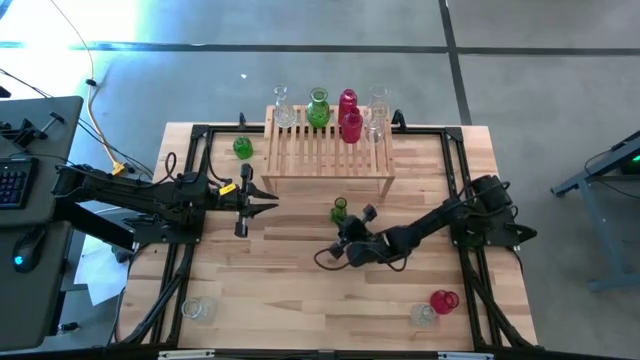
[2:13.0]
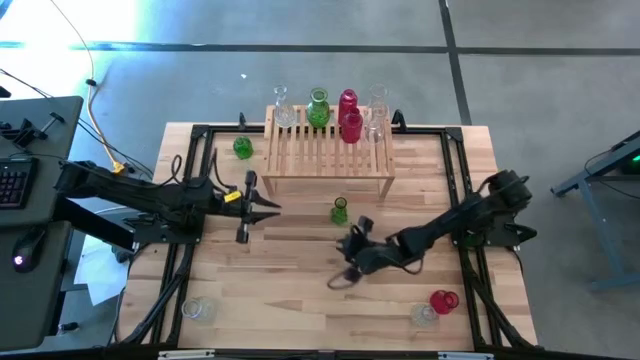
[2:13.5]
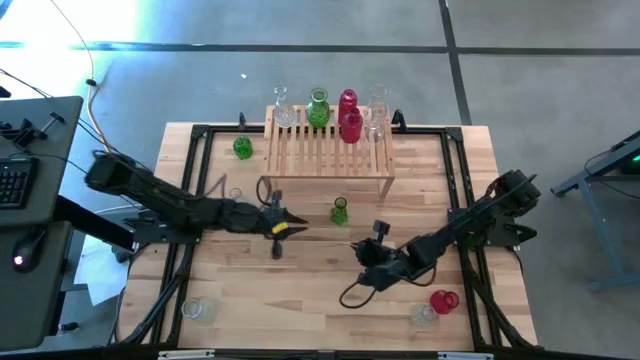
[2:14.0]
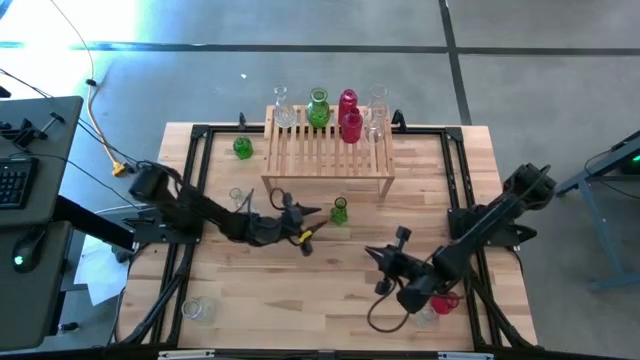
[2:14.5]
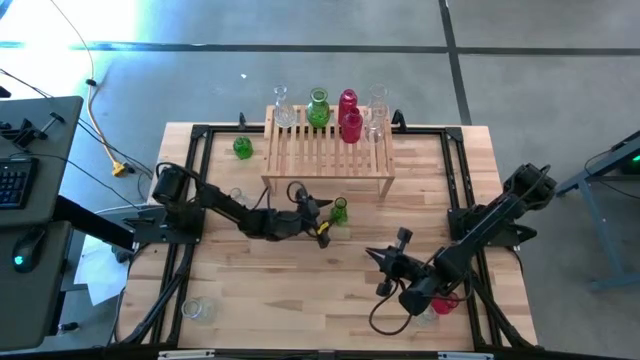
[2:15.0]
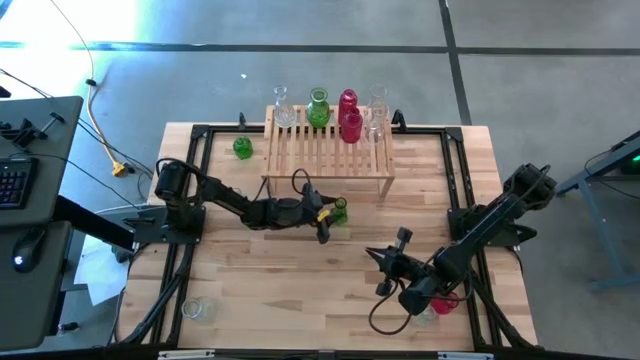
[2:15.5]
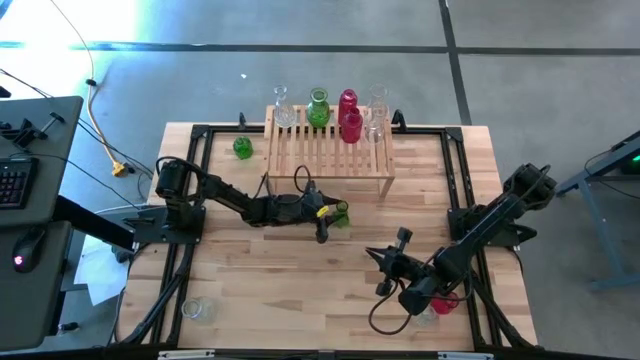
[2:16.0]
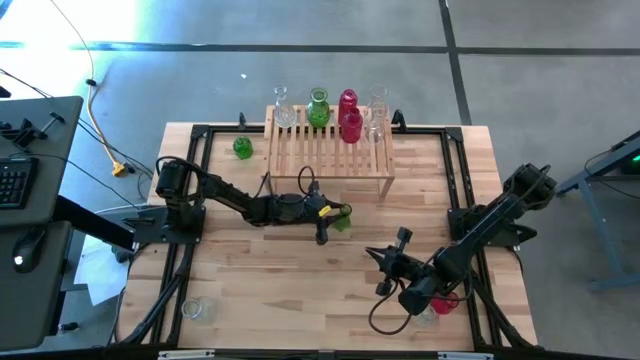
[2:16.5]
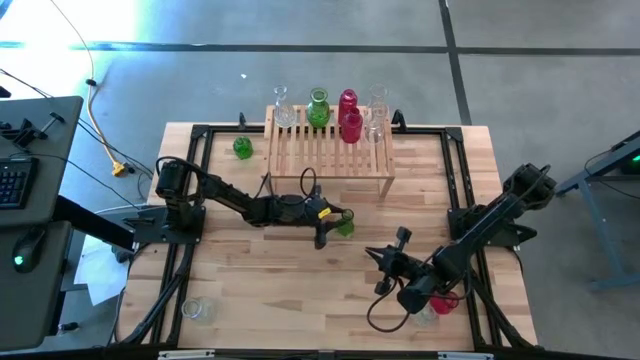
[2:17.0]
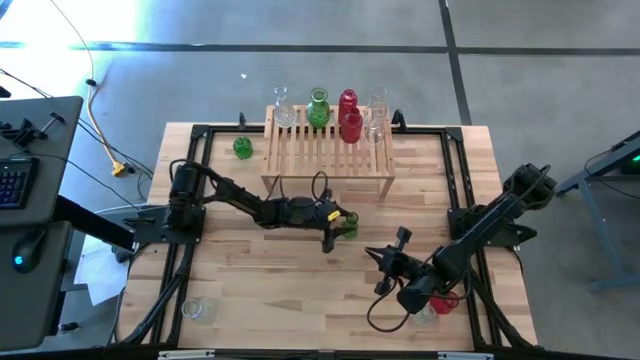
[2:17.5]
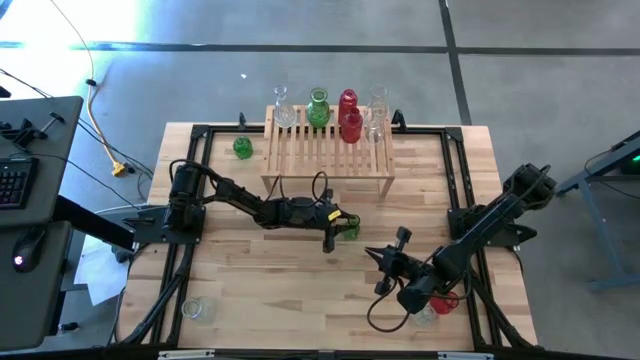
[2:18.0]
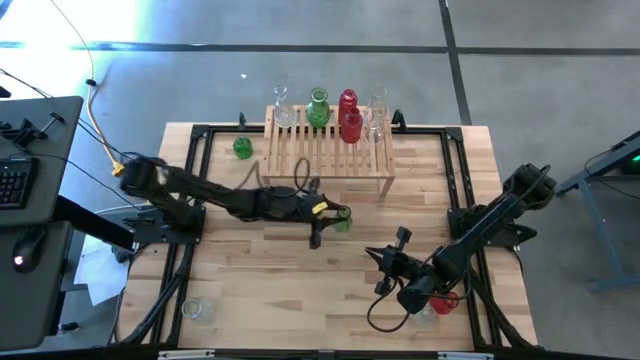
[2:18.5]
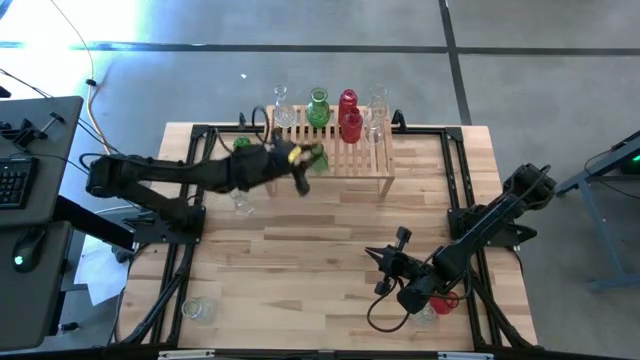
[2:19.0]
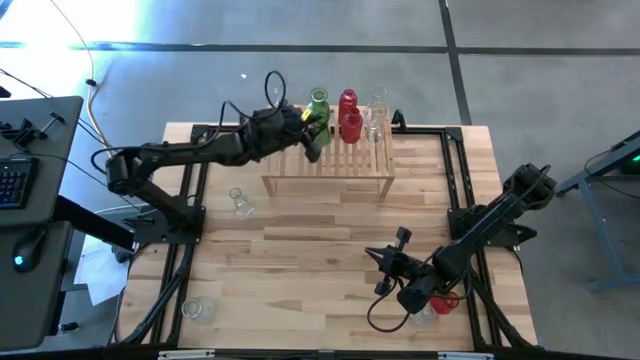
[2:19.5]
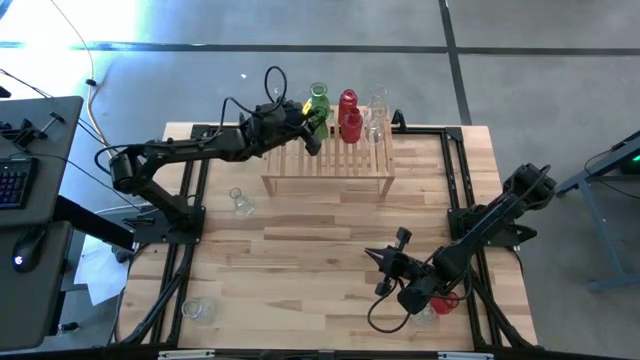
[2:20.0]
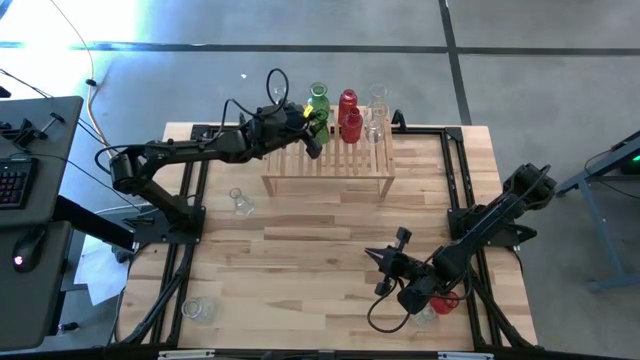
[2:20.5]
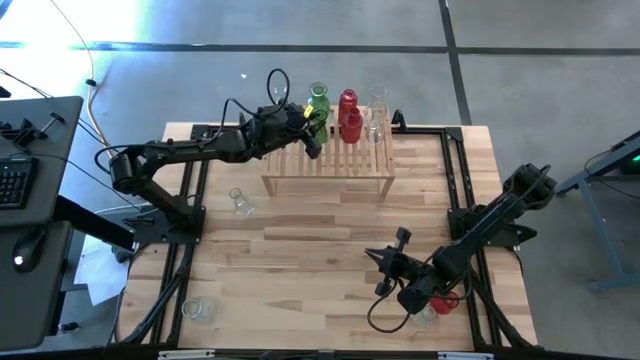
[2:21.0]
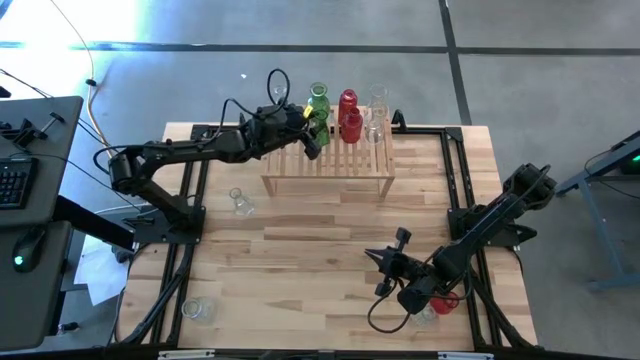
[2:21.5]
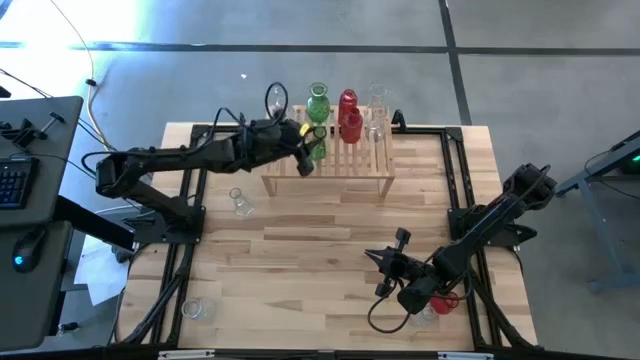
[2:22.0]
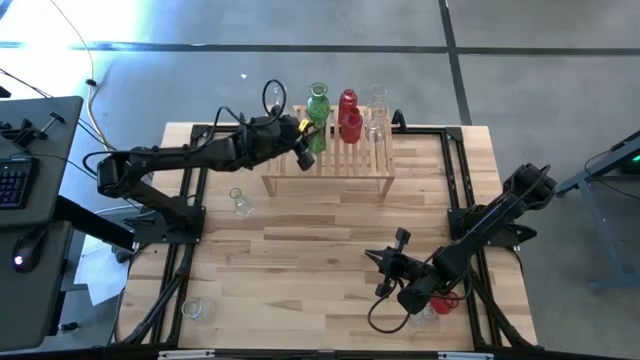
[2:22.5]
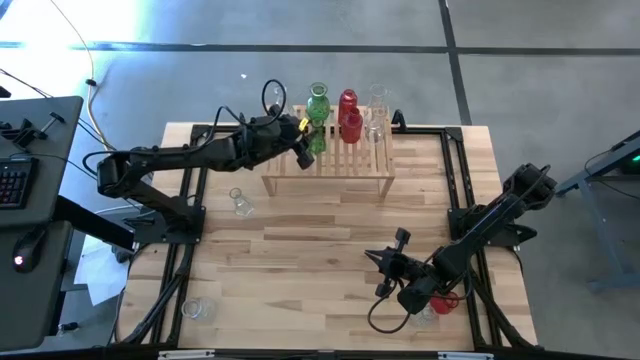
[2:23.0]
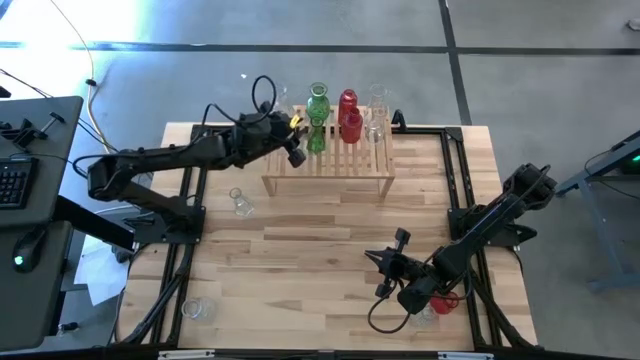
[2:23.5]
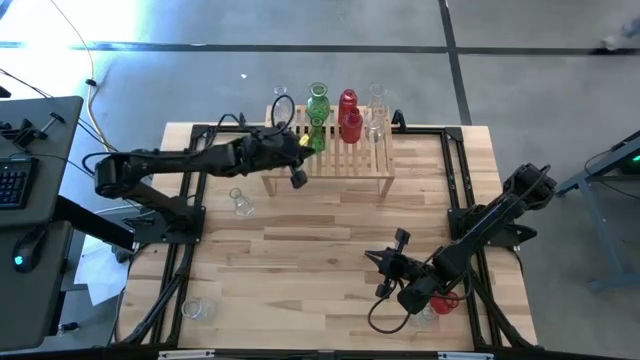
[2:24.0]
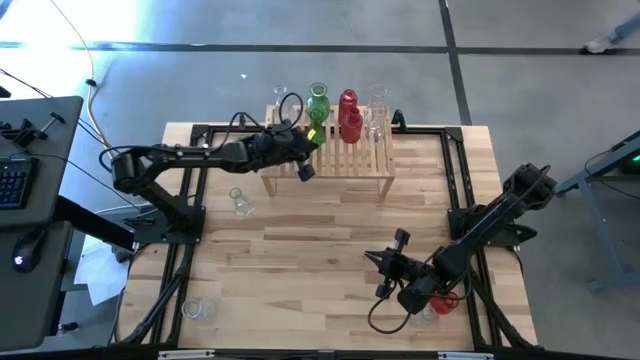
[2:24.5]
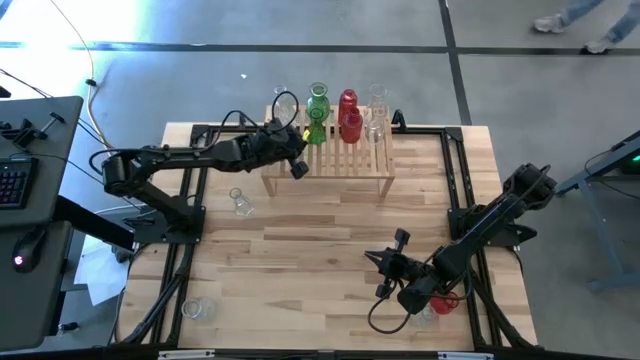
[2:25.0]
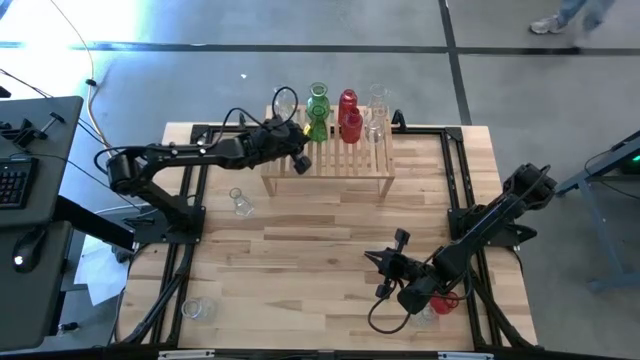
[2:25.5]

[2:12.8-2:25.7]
Task: sort vases onto shelf
Put the green vase on the shelf aligned with the other green vase

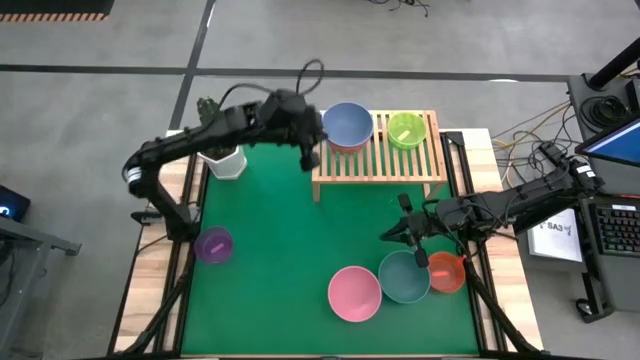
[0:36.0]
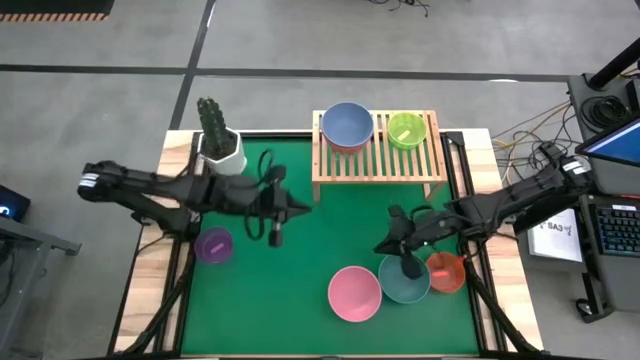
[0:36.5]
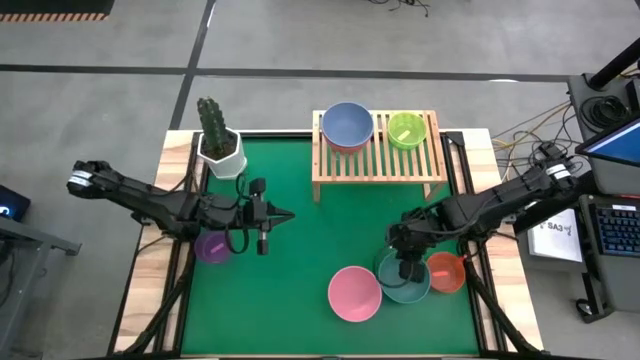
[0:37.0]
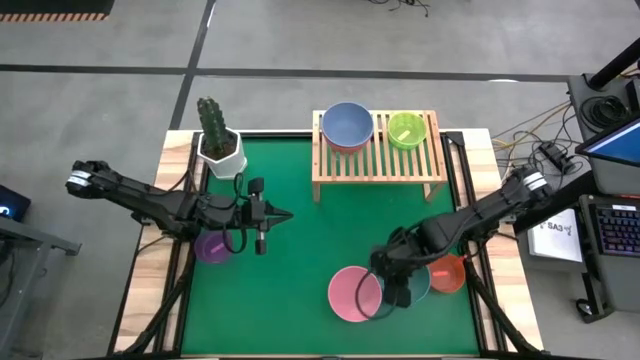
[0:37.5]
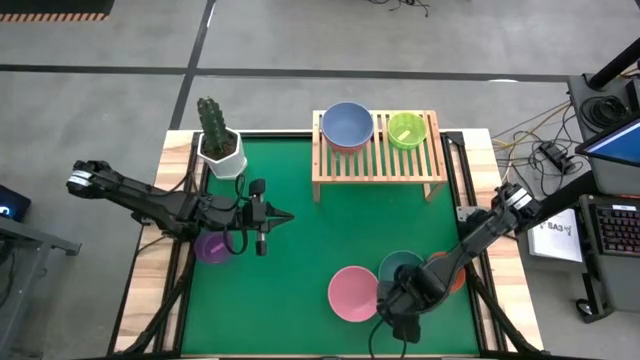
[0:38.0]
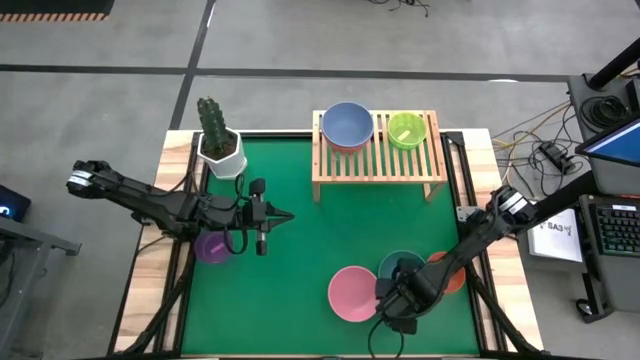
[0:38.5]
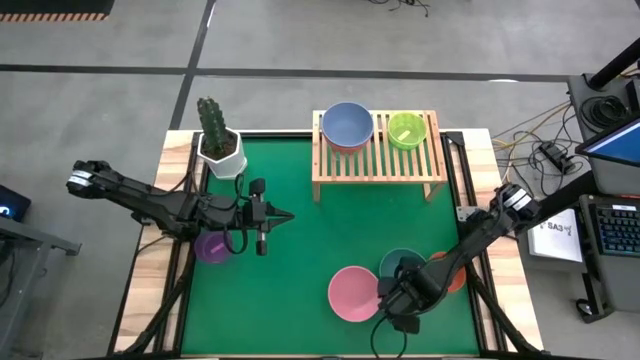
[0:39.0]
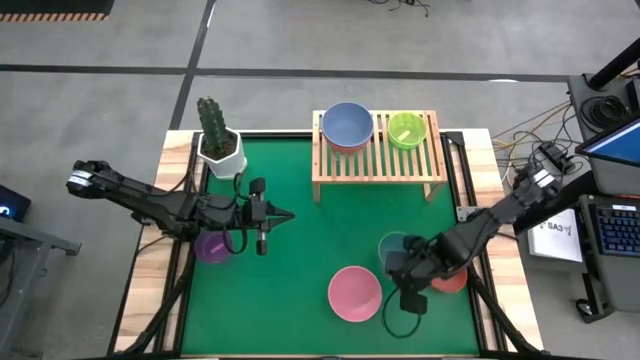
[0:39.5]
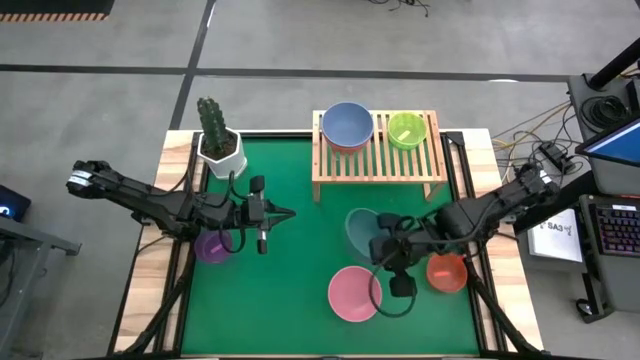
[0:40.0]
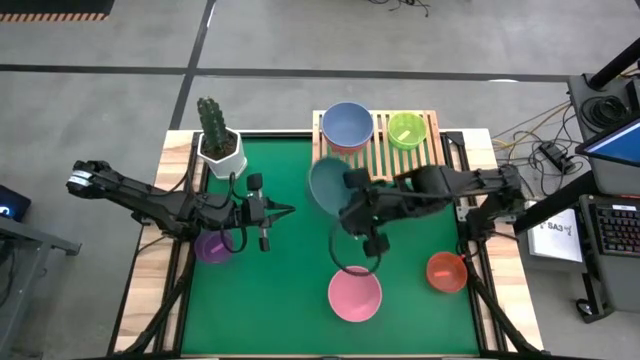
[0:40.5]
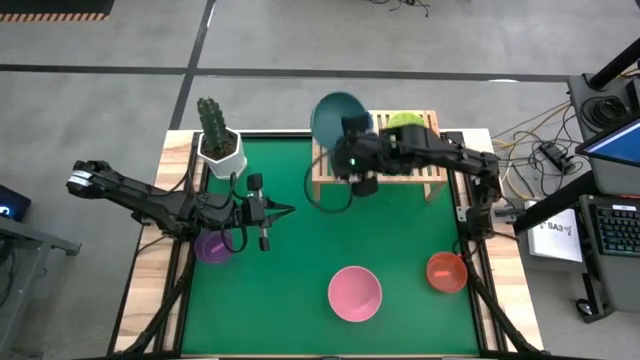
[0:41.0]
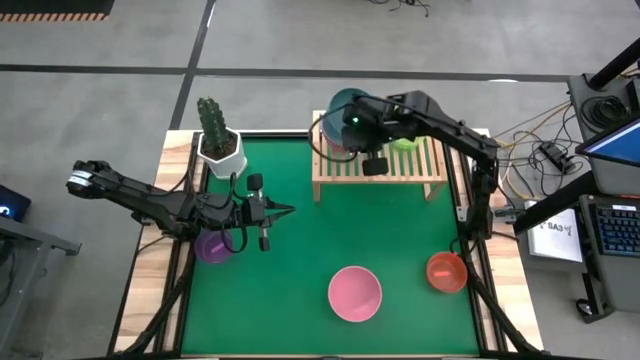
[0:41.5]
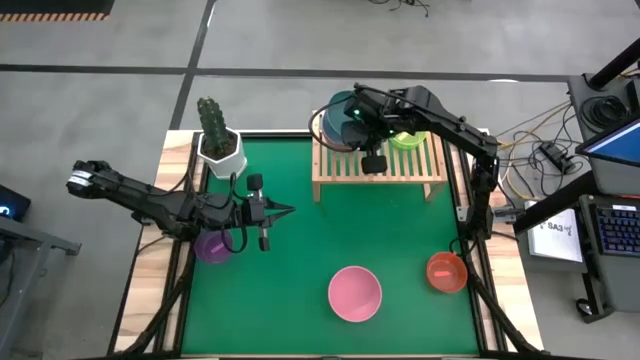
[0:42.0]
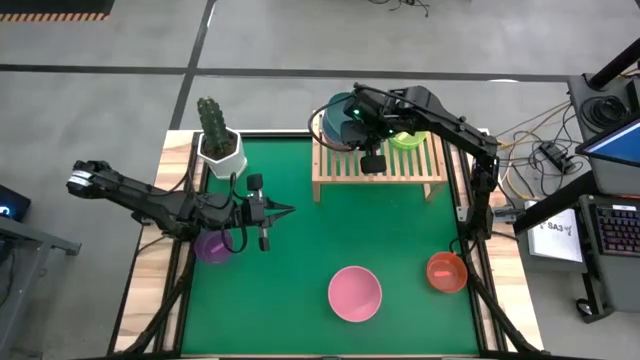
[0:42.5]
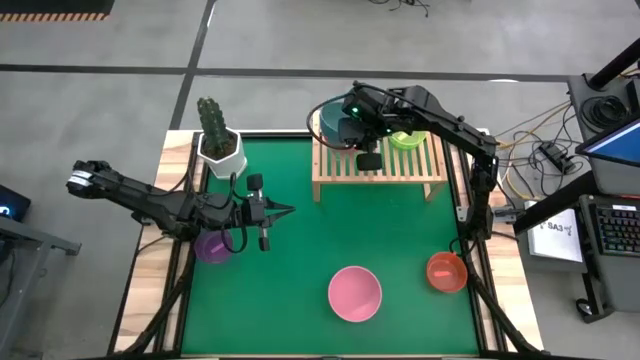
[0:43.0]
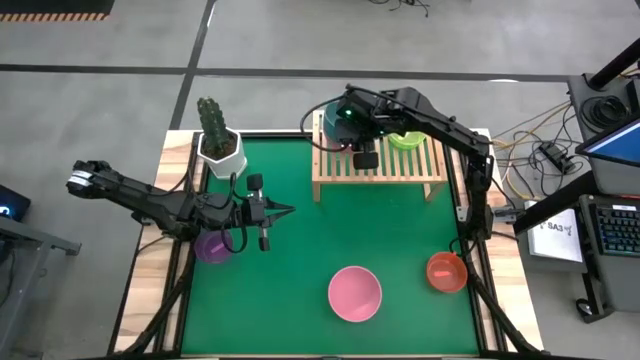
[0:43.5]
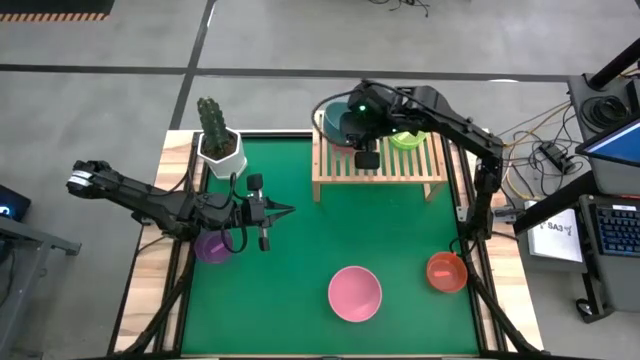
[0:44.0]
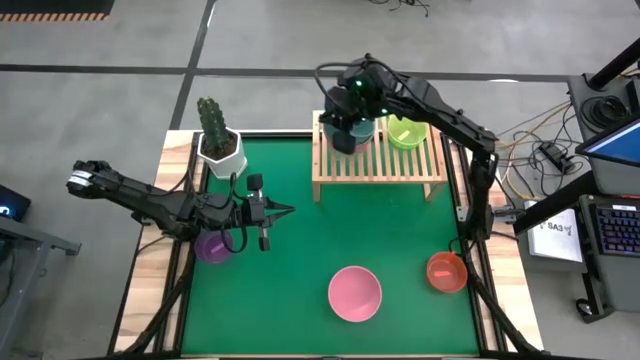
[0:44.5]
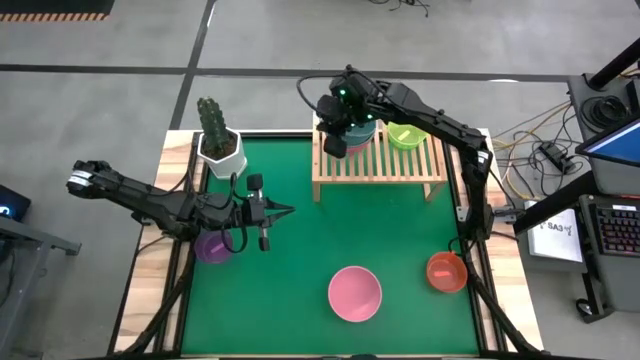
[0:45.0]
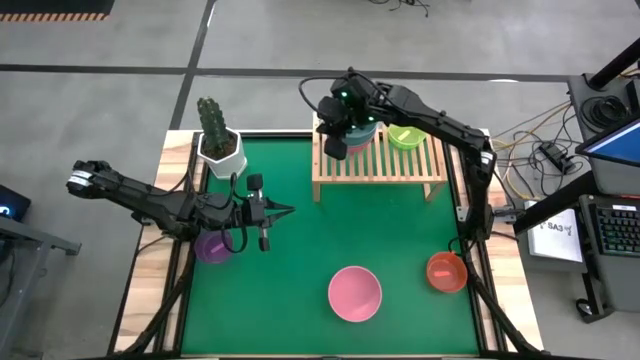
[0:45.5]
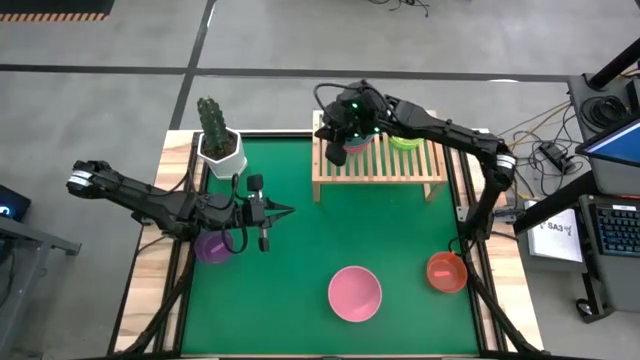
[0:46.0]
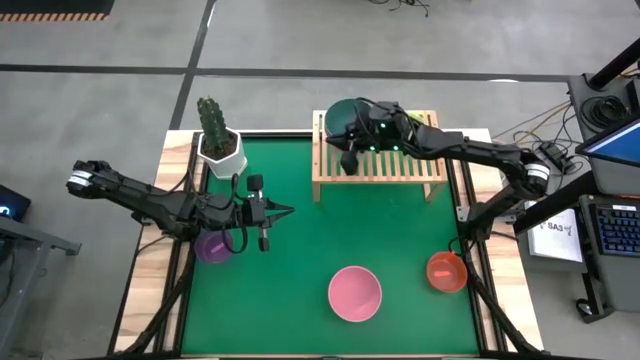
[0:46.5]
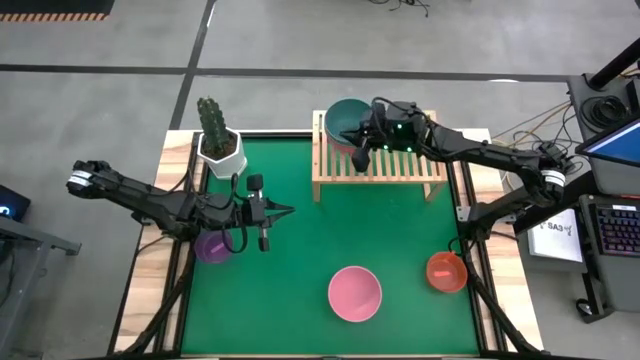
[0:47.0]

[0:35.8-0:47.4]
Task: Place and stack bowls onto a shelf
Stack the dark green bowl on top of the blue bowl on the shelf
